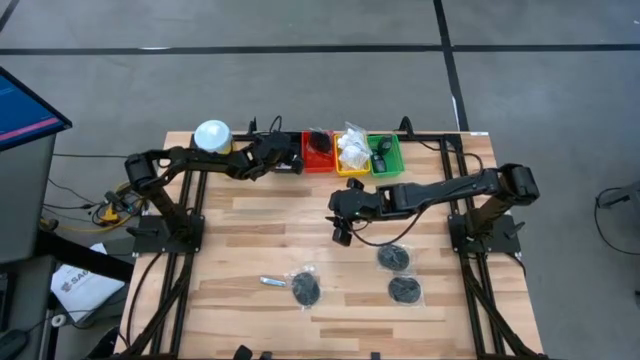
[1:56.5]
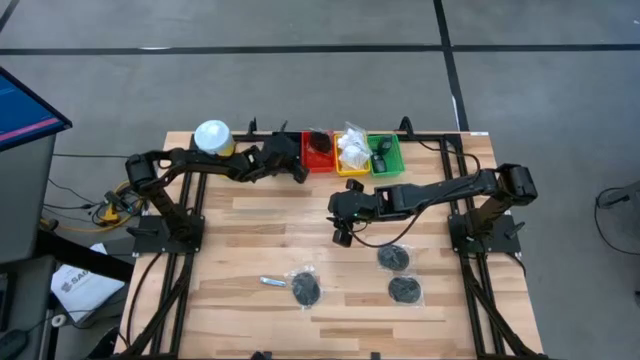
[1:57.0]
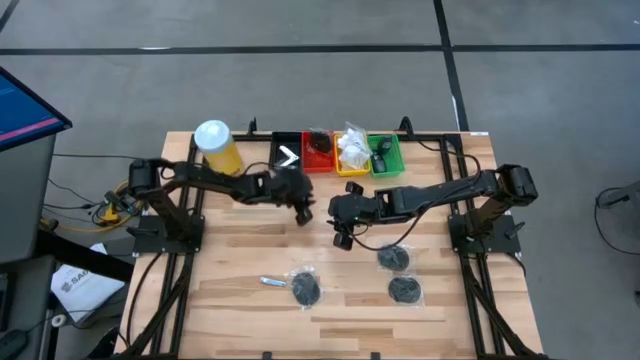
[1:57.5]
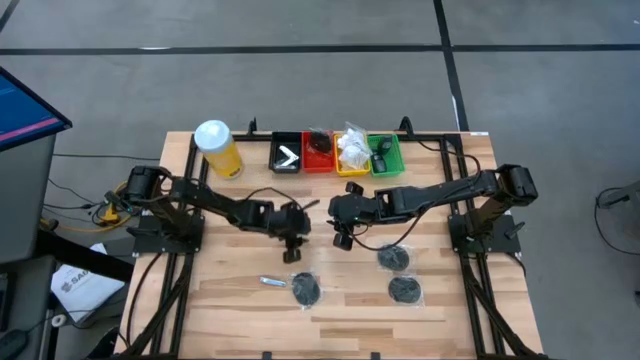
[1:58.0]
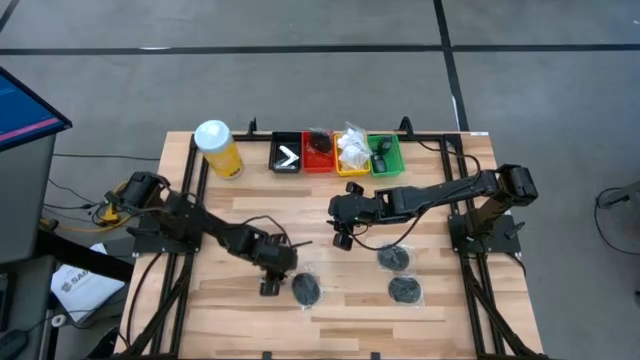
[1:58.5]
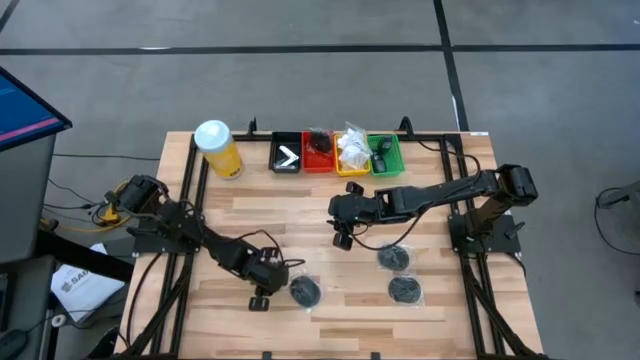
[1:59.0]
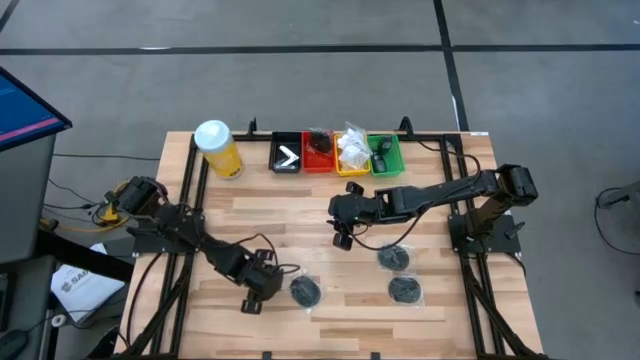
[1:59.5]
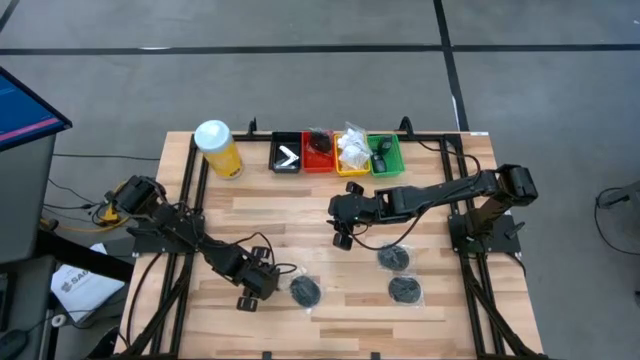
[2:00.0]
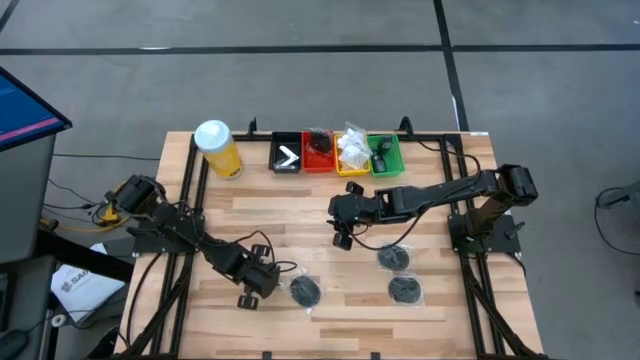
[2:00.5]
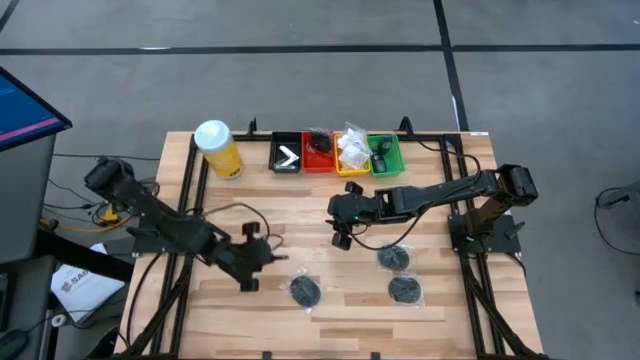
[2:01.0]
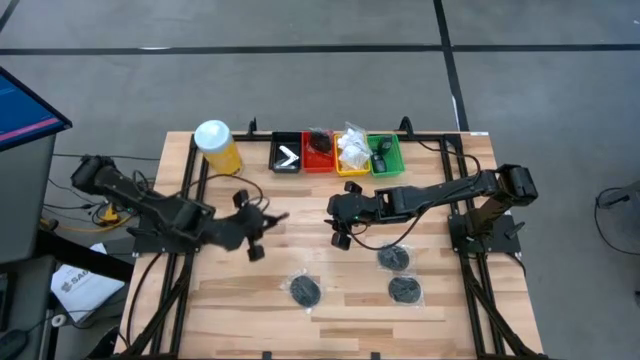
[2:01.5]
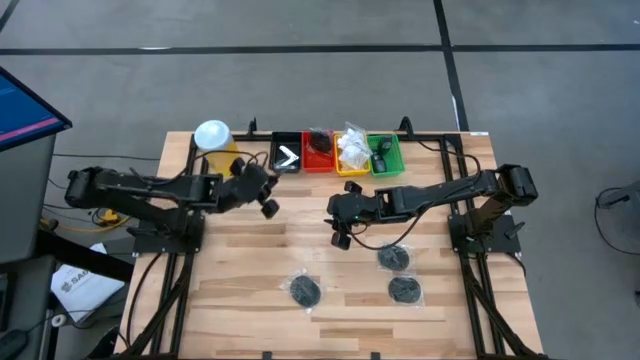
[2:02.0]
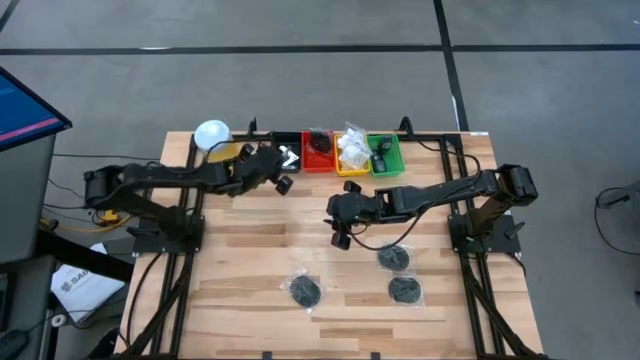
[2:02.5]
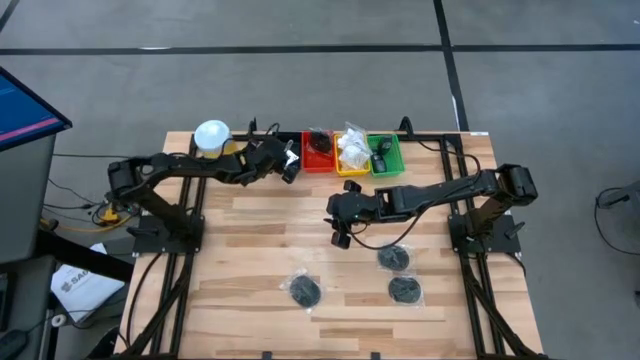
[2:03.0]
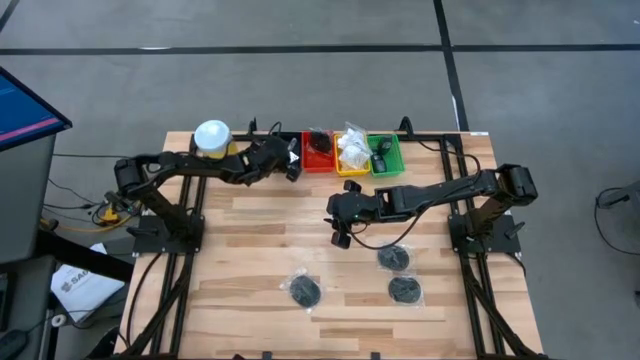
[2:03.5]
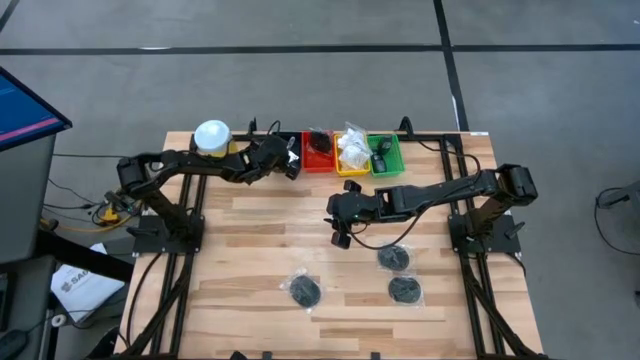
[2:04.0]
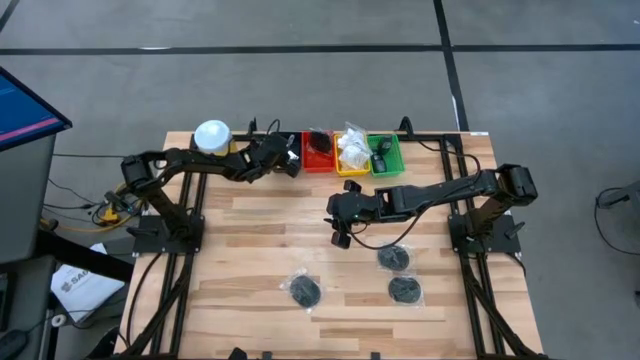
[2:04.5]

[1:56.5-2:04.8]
Task: Pick & Place Travel size toiletries
Put the nail cutter into the black bin

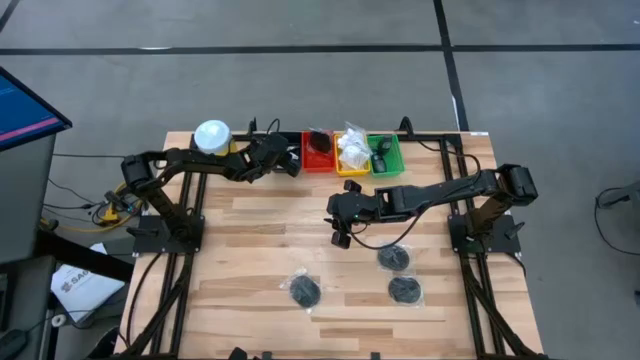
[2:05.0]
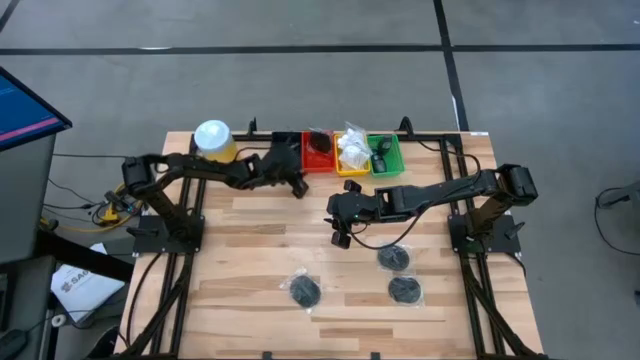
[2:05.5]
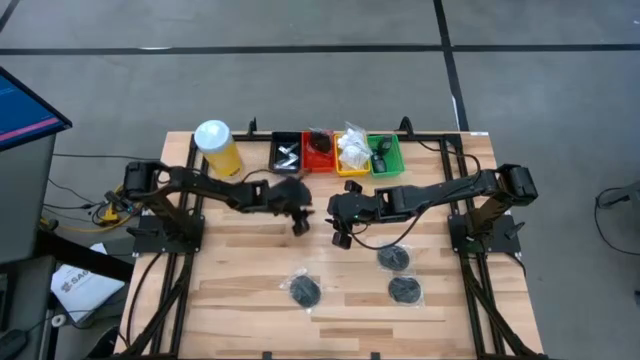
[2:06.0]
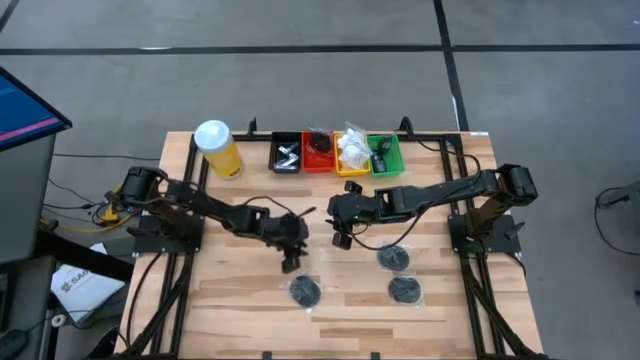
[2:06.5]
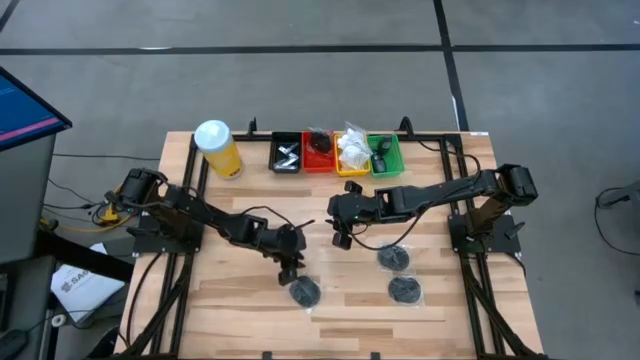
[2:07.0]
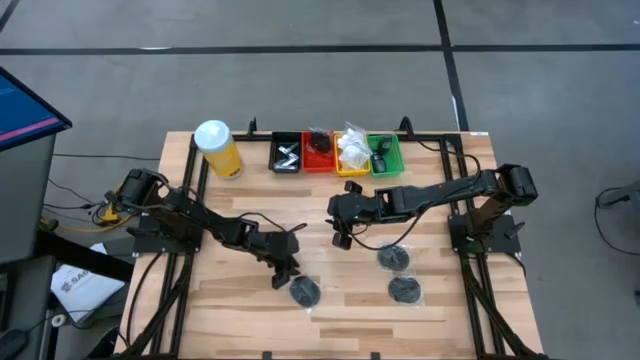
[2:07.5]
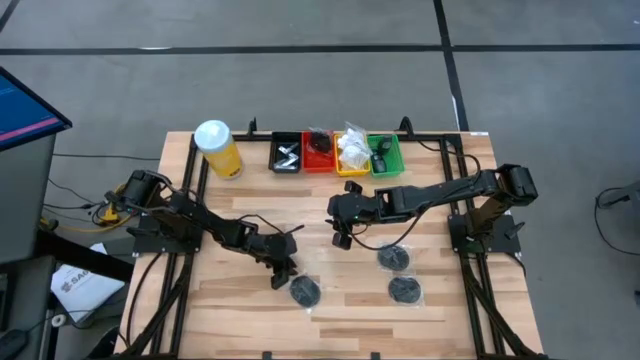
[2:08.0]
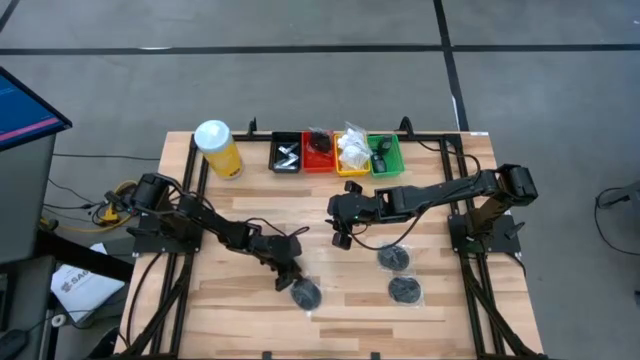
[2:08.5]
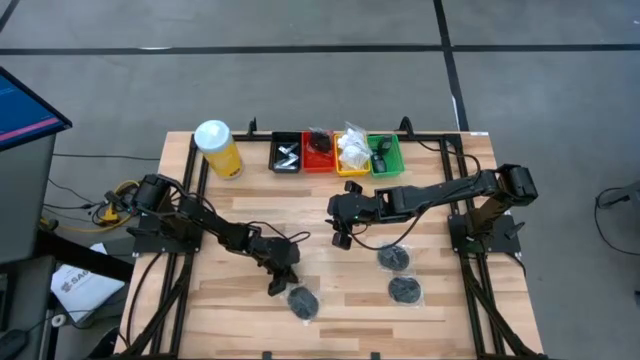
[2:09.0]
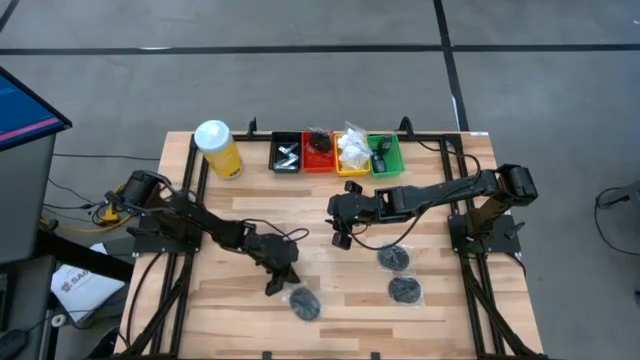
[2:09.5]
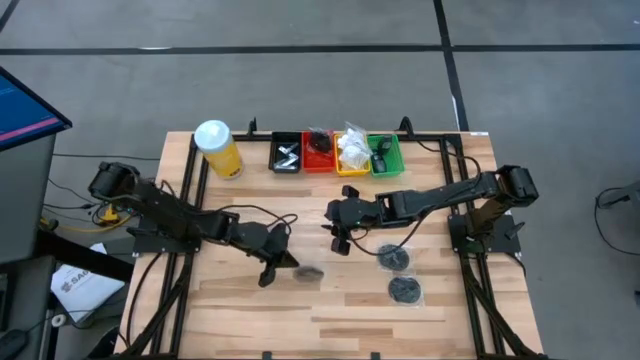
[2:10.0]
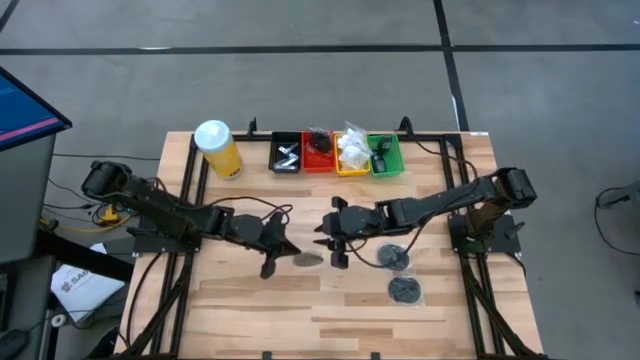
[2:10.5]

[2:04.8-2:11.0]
Put the hairbrush into the red bin

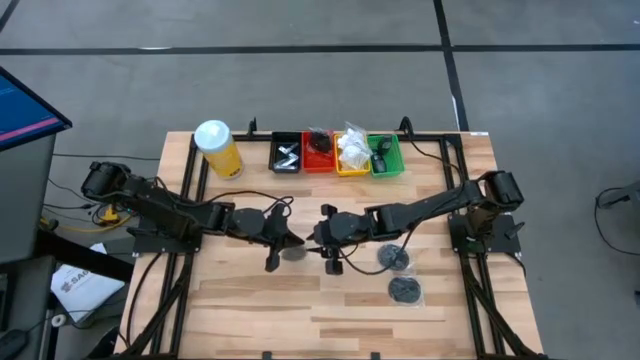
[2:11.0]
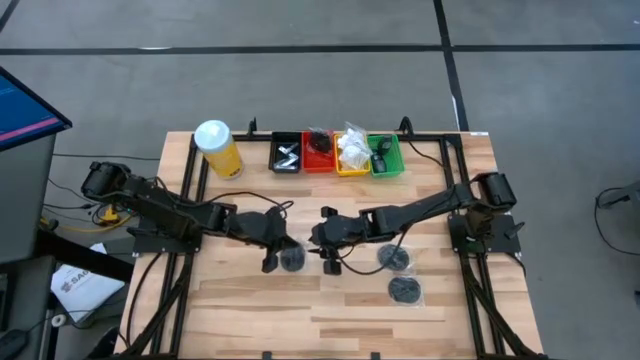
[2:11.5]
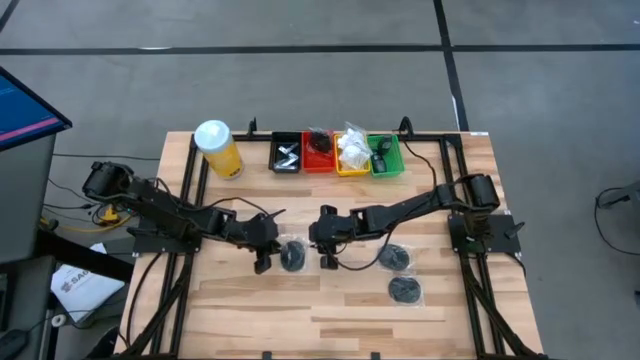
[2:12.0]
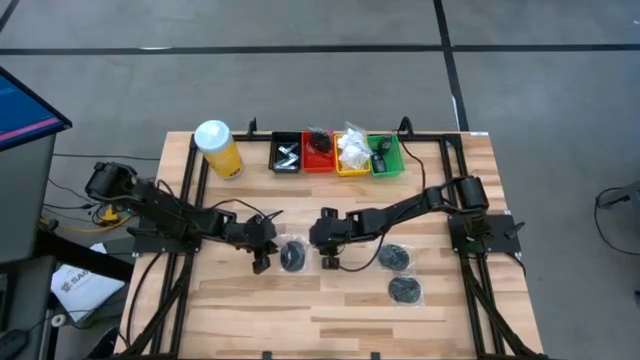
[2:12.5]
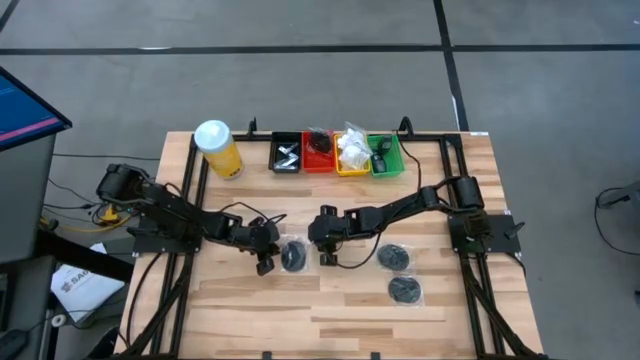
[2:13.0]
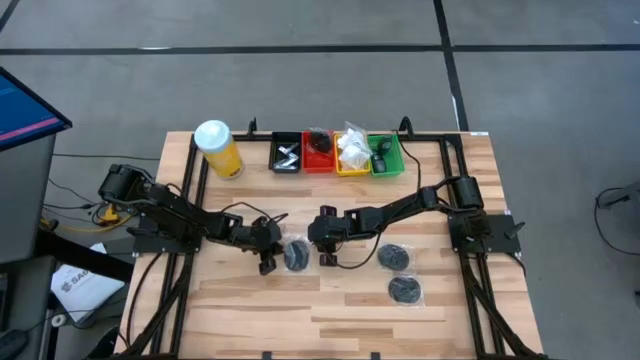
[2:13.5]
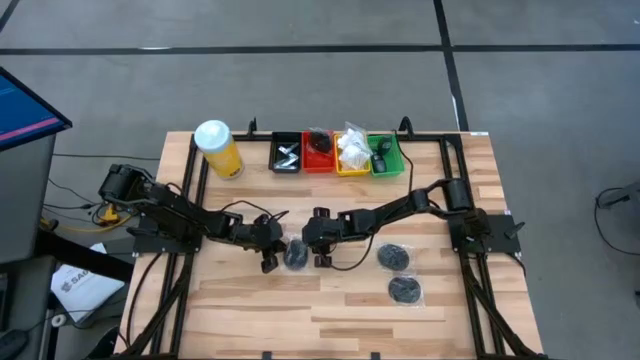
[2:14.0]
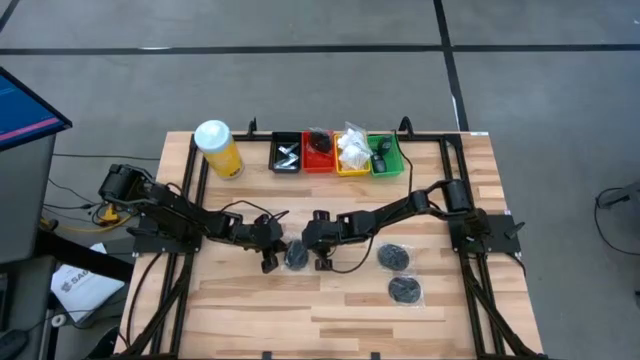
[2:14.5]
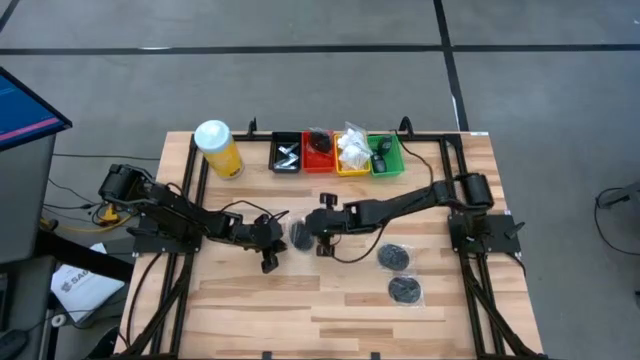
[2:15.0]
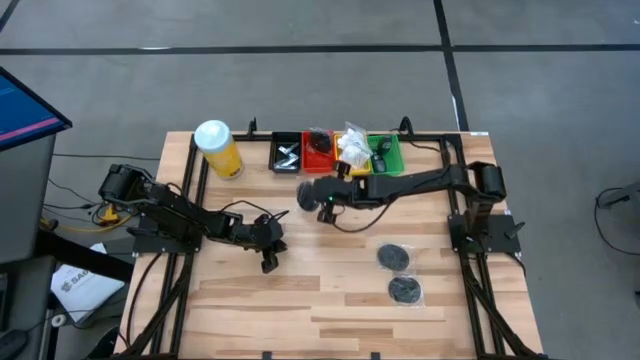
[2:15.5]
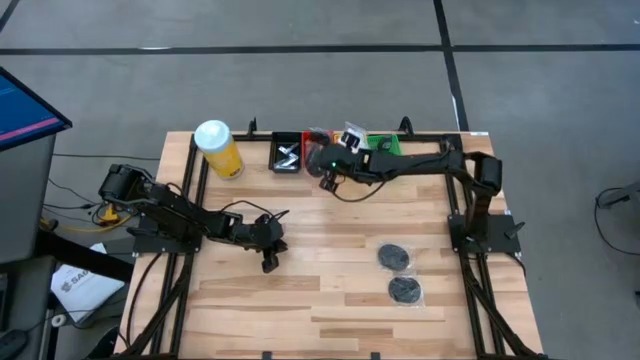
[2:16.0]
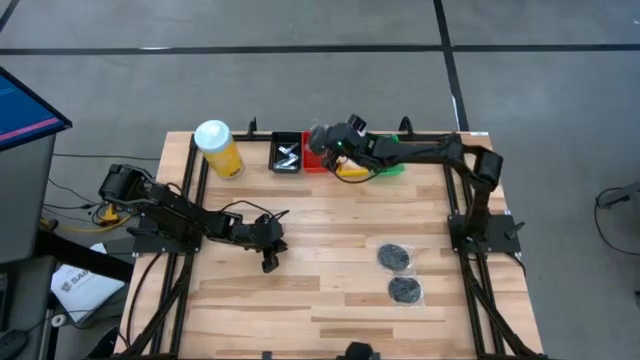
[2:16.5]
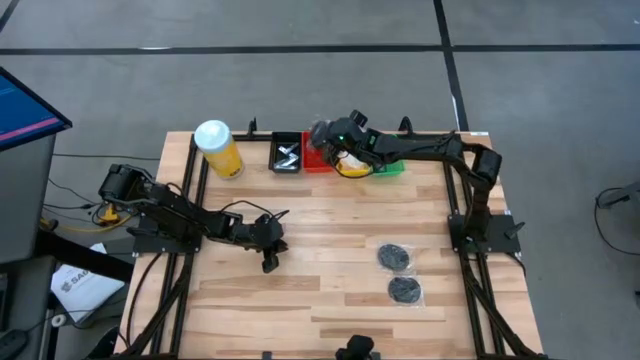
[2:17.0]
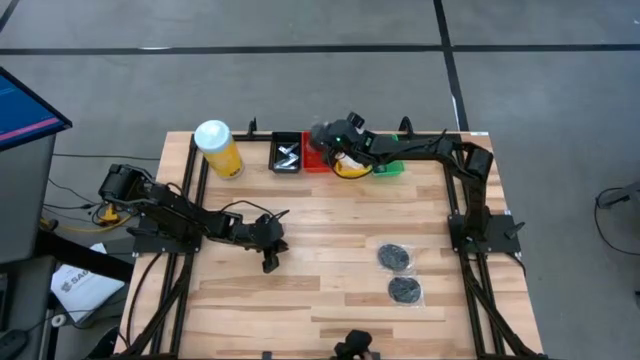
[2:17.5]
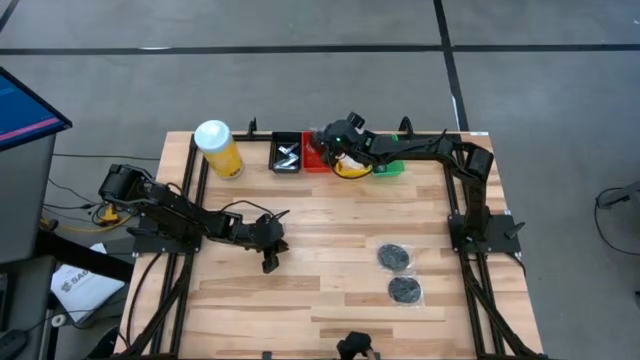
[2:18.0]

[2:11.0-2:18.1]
Put the hairbrush into the red bin
